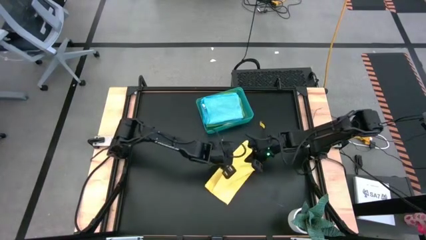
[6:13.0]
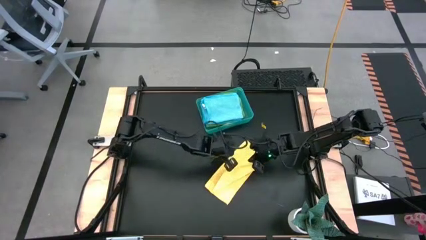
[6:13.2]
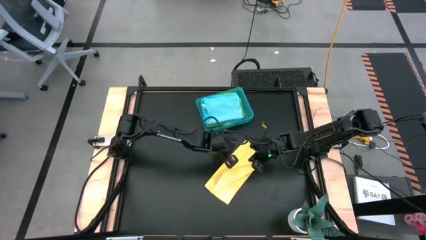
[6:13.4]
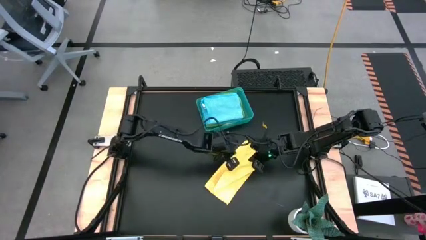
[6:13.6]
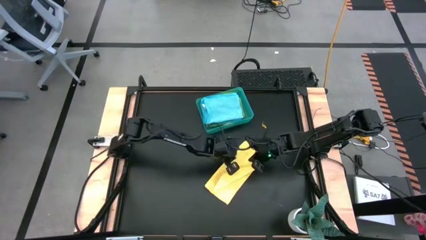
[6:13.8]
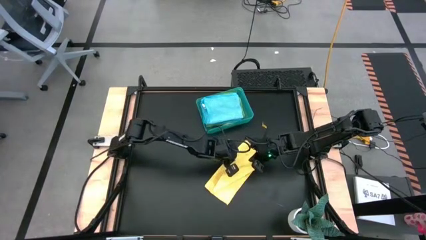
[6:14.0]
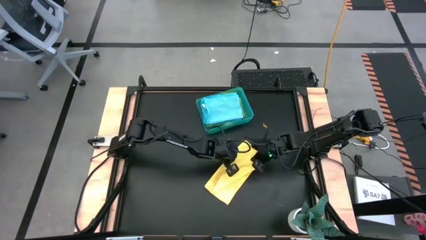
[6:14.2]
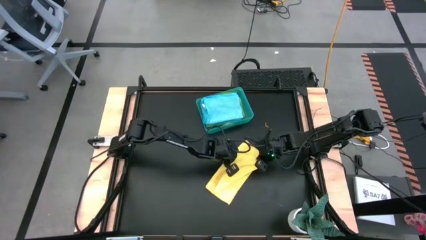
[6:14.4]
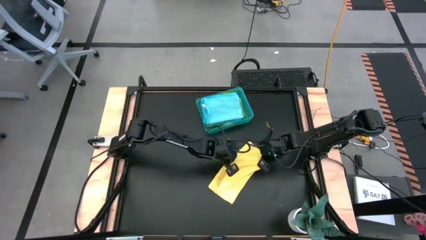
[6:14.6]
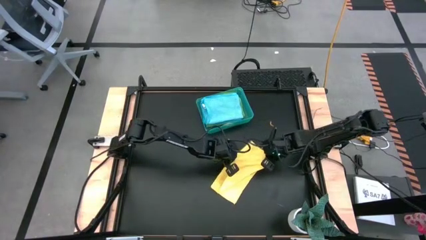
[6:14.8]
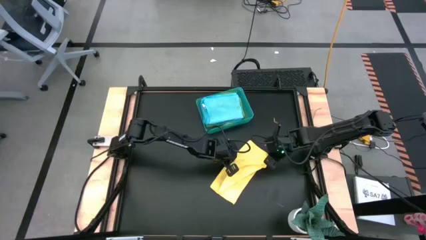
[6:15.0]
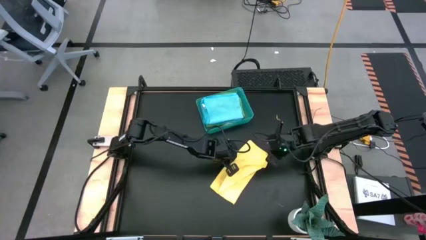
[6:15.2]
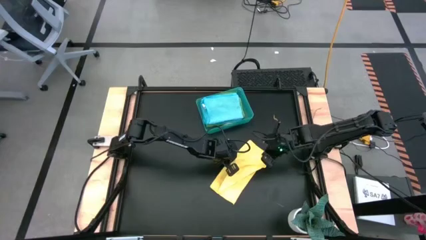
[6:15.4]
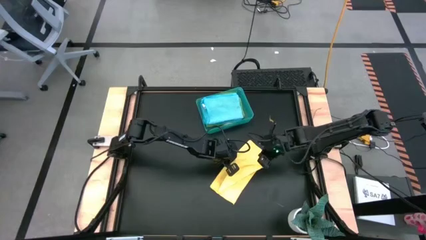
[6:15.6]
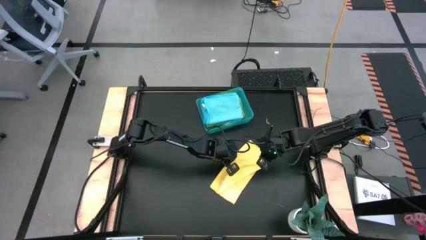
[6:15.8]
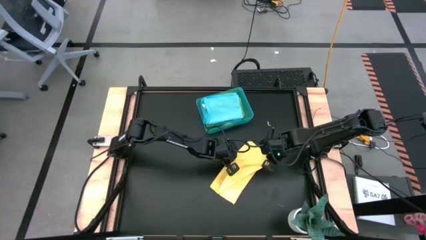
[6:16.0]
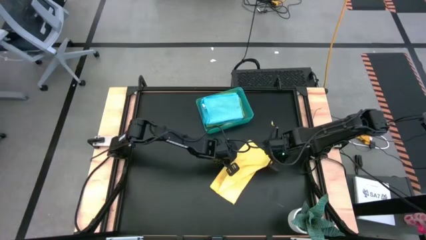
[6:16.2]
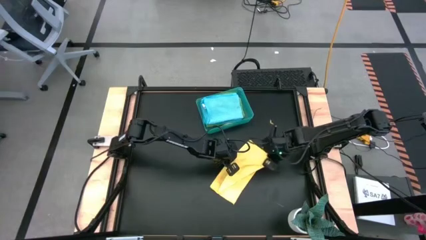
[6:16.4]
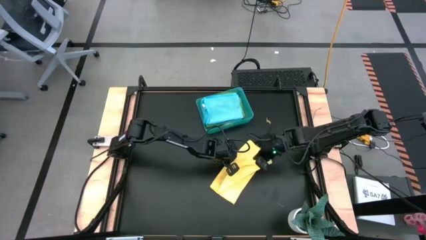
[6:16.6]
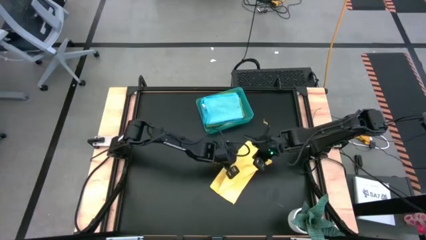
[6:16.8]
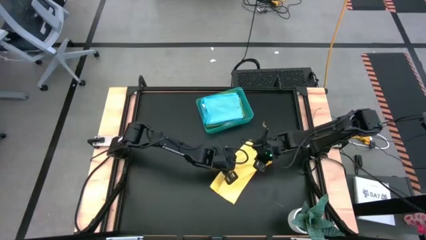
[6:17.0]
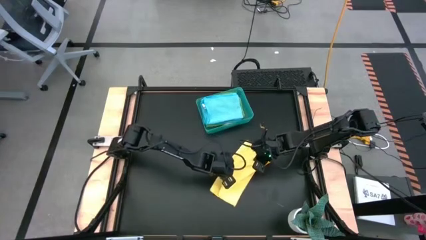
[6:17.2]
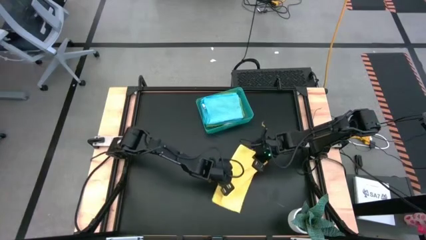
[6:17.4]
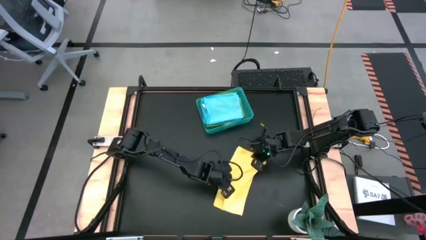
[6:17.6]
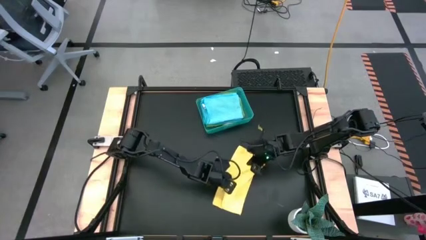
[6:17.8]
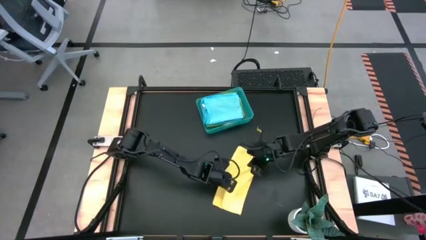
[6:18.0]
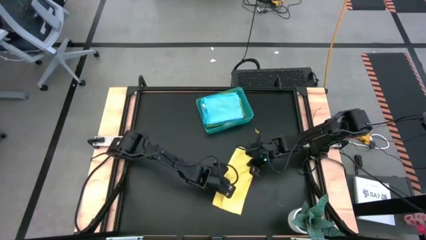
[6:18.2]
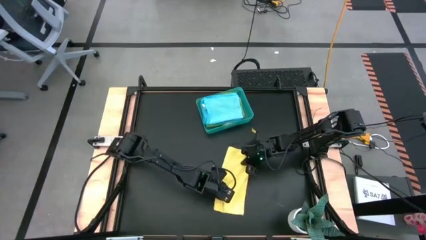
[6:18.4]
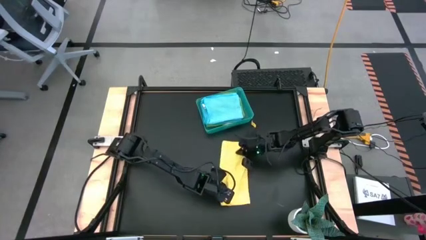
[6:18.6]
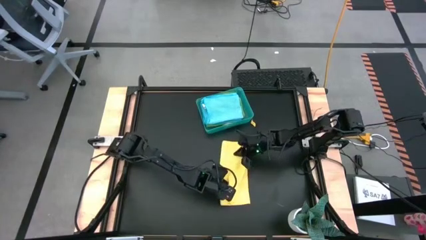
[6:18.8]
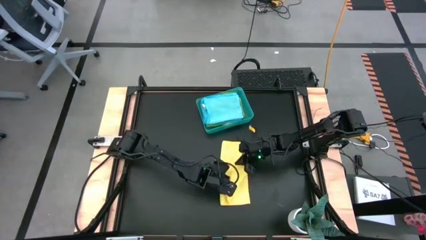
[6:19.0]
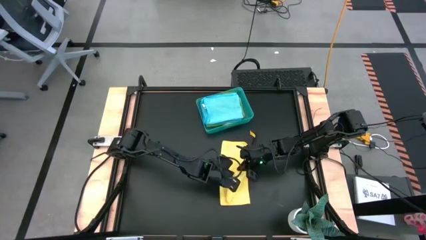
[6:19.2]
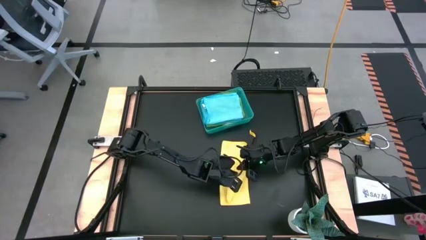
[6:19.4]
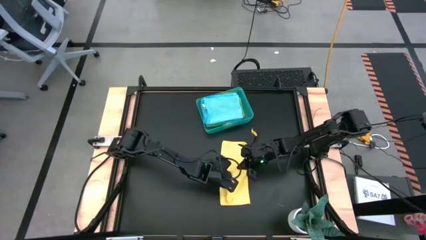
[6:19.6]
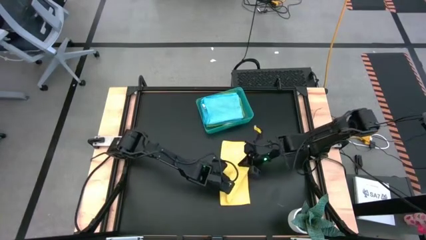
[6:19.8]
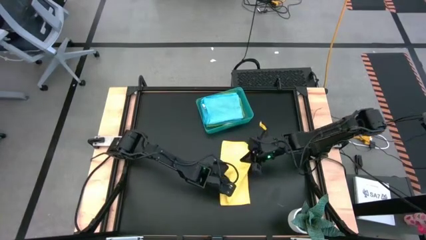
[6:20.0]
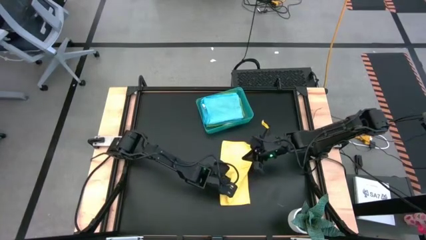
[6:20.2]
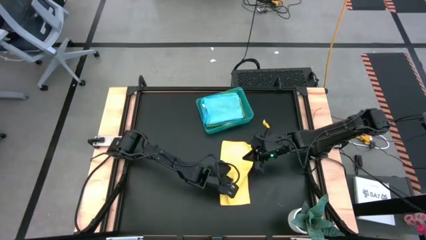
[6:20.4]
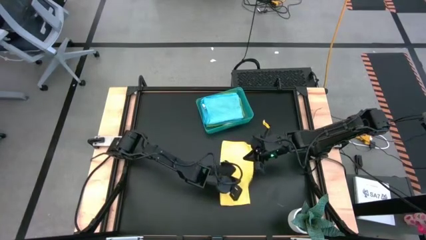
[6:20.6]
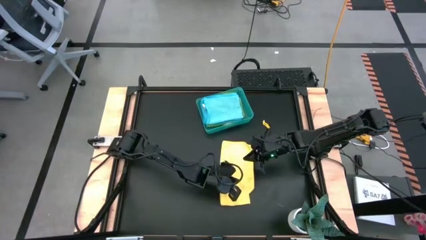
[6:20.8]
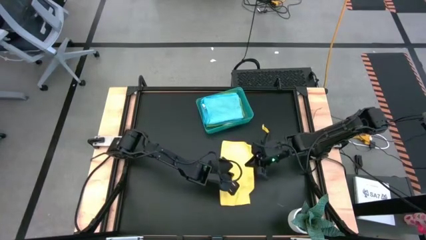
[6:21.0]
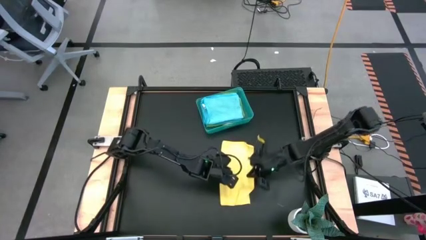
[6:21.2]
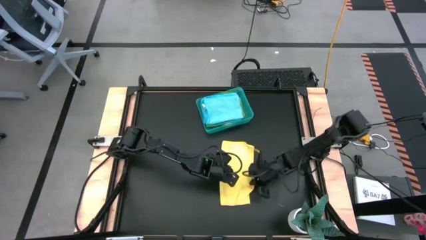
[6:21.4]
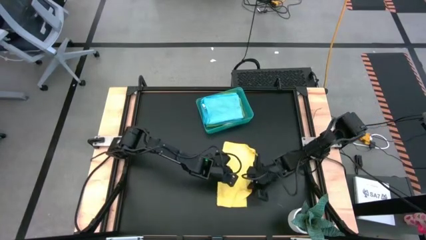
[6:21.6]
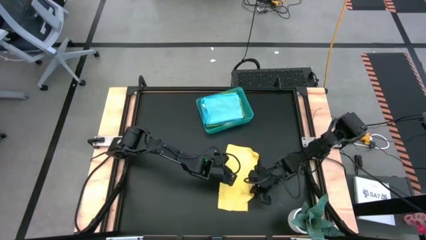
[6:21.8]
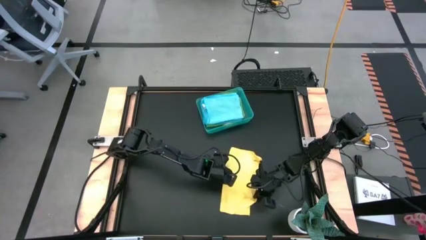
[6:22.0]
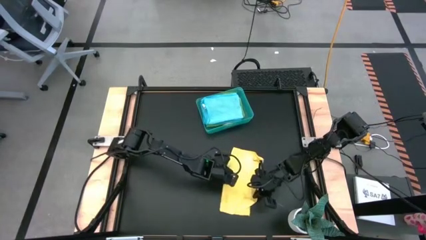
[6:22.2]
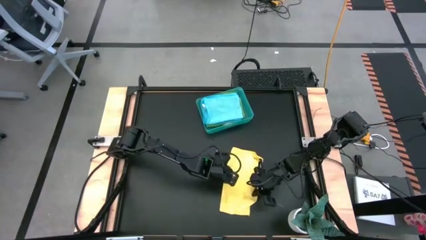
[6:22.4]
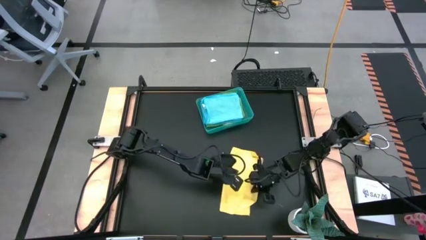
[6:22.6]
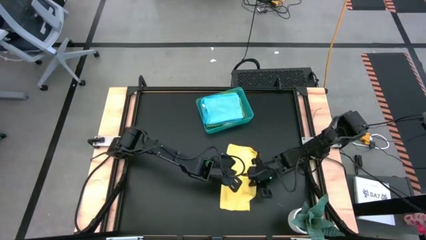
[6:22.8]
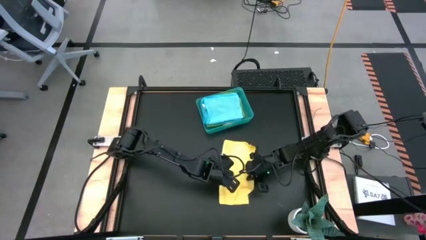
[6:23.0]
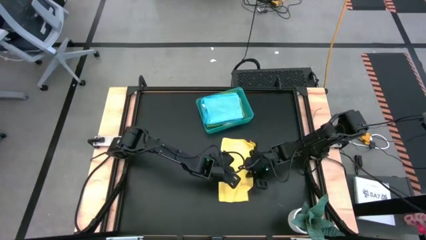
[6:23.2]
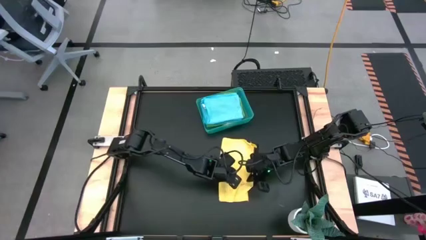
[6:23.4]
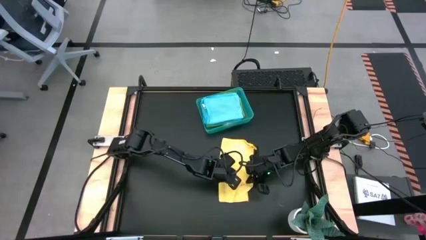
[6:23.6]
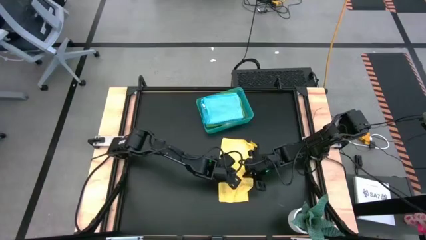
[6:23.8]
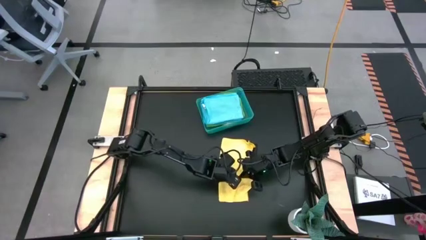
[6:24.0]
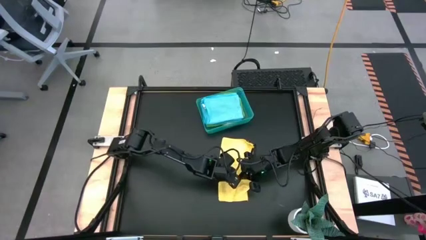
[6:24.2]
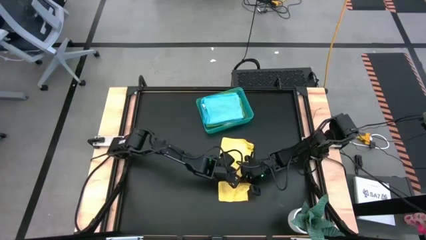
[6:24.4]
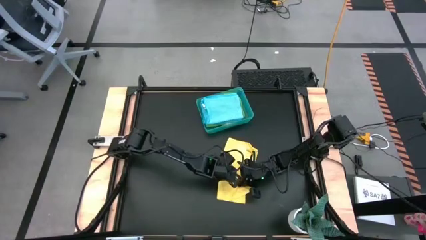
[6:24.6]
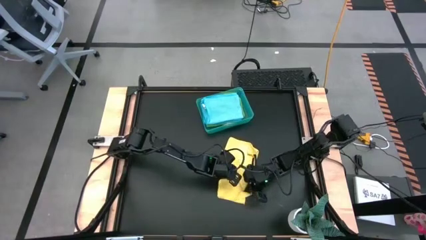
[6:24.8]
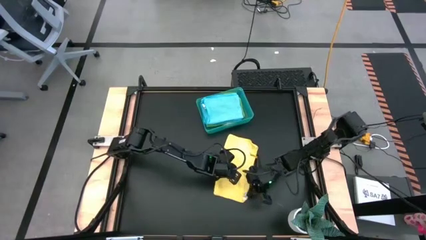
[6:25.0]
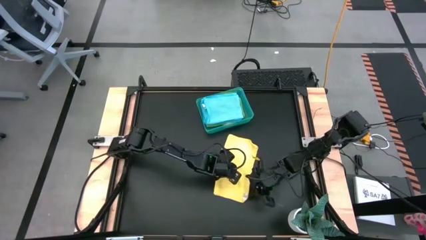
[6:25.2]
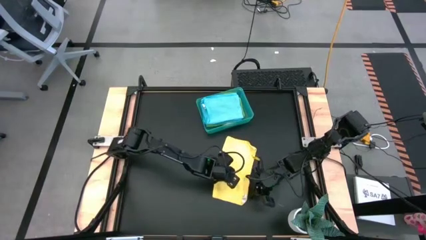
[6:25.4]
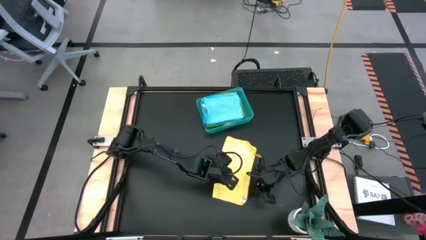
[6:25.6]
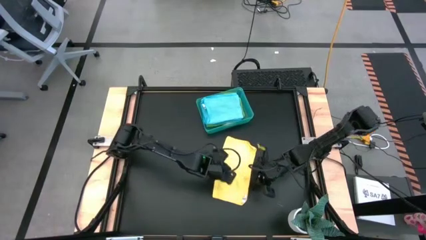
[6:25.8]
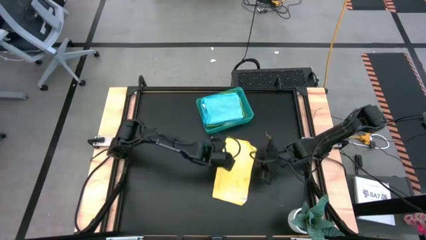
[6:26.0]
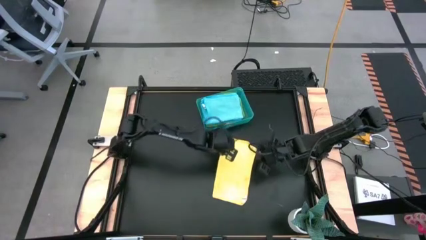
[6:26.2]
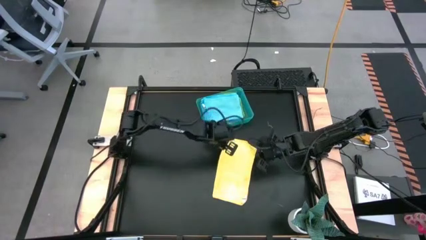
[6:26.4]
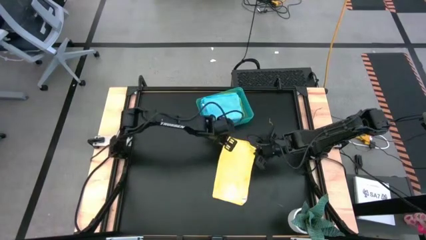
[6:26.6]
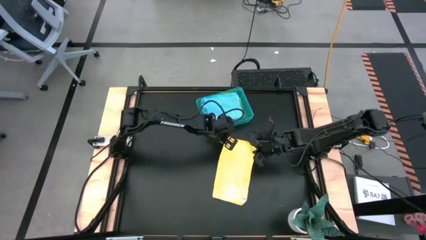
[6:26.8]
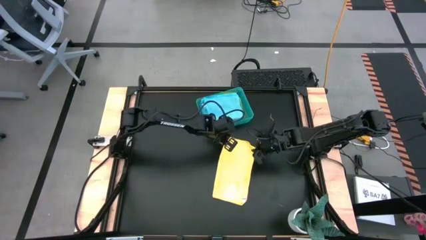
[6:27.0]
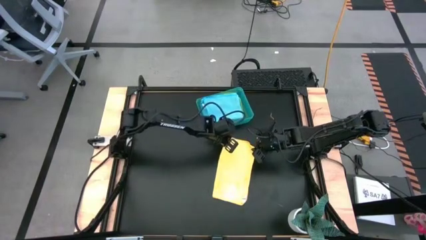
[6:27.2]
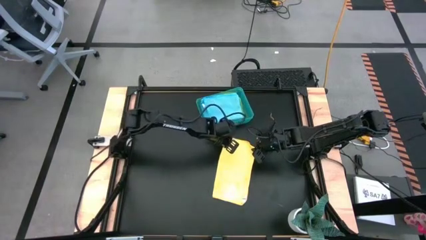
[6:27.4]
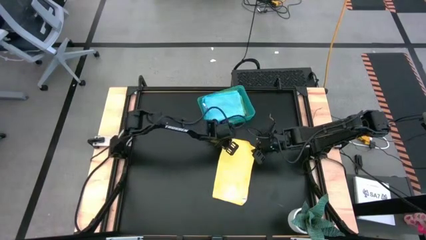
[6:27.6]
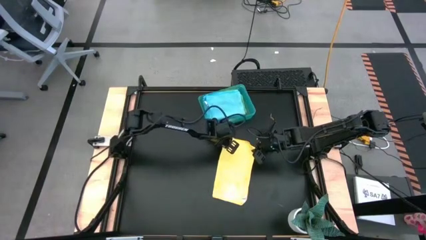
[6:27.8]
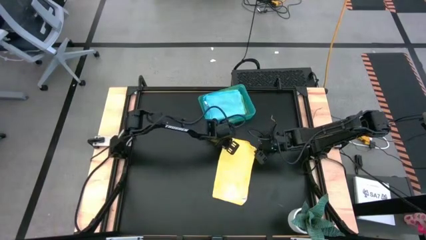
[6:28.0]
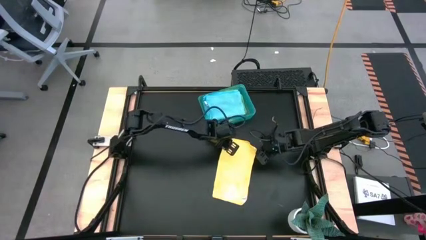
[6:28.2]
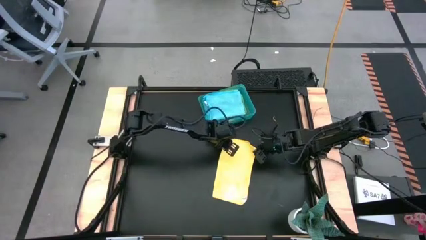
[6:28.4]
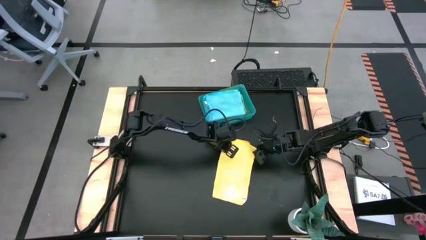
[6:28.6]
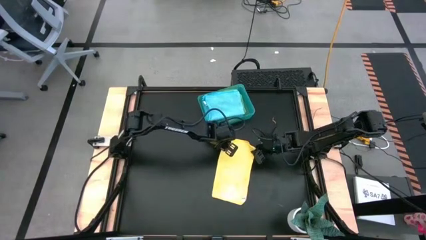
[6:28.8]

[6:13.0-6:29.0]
Task: Fold microfiber towels
Fold the yellow microfiber towel
